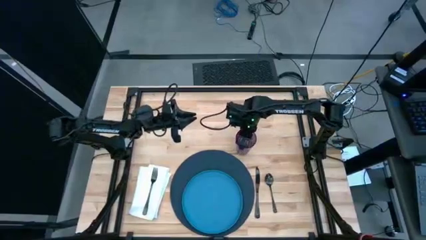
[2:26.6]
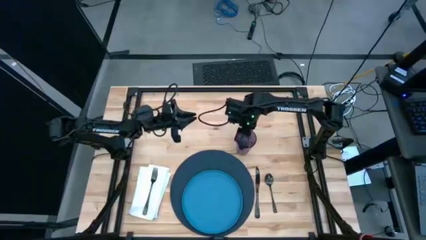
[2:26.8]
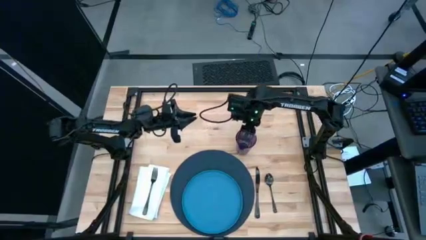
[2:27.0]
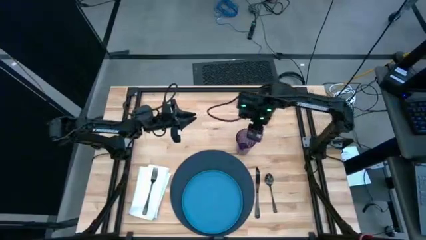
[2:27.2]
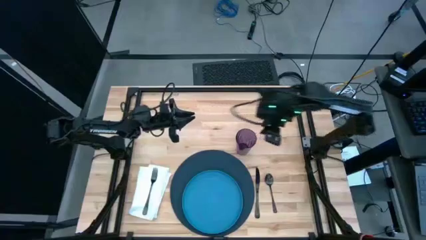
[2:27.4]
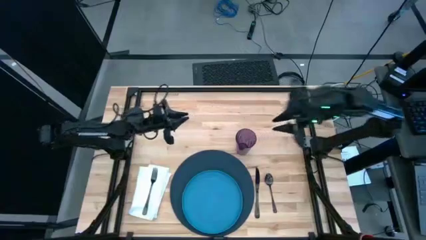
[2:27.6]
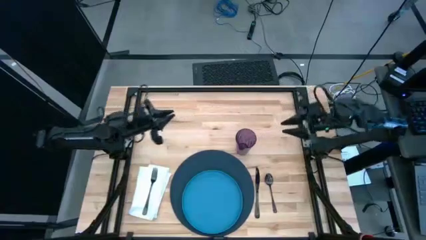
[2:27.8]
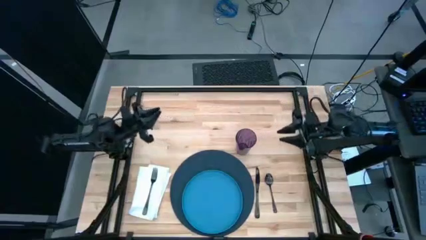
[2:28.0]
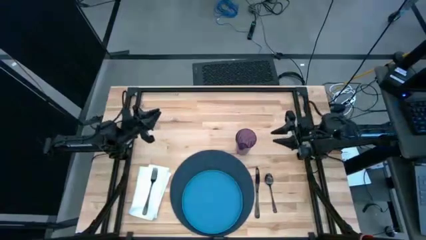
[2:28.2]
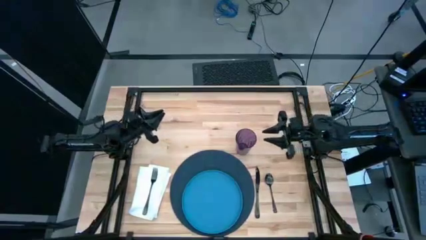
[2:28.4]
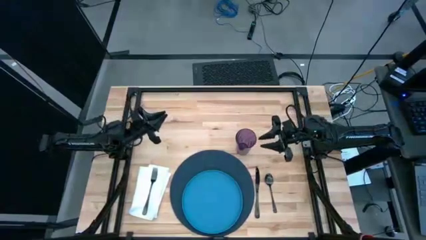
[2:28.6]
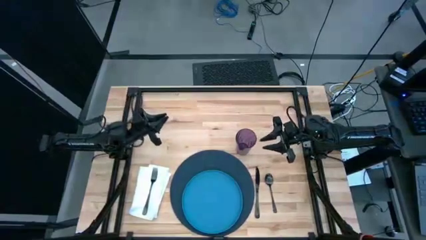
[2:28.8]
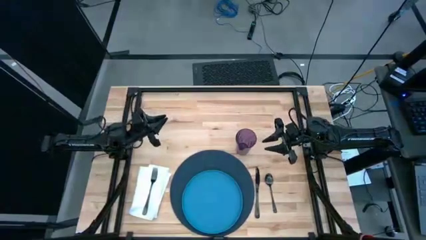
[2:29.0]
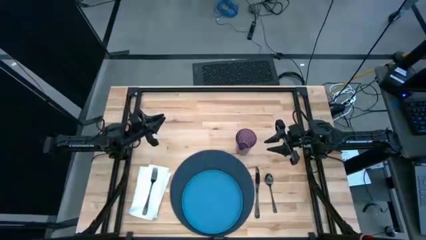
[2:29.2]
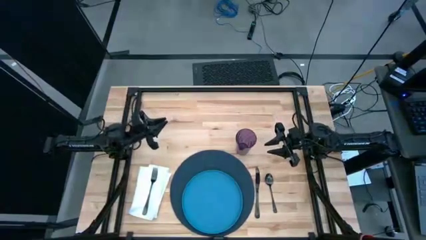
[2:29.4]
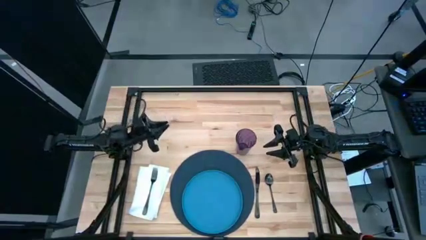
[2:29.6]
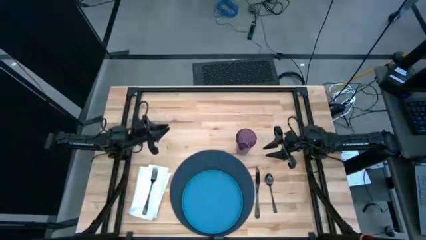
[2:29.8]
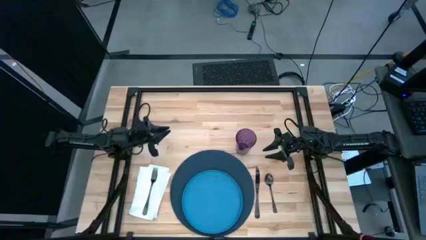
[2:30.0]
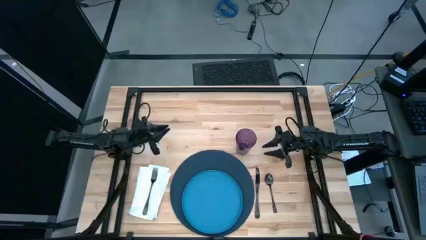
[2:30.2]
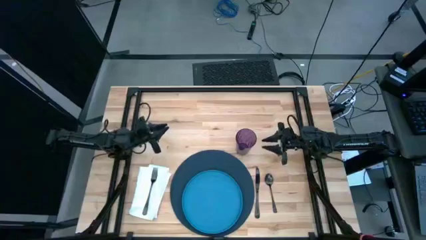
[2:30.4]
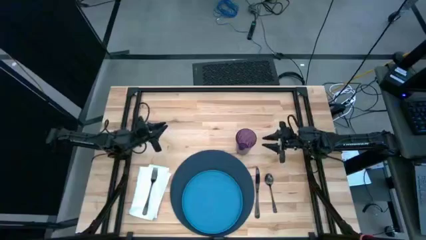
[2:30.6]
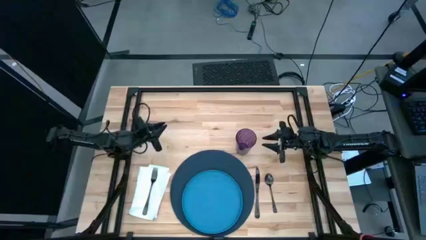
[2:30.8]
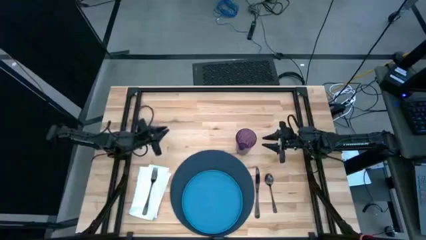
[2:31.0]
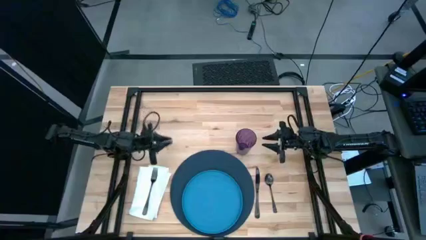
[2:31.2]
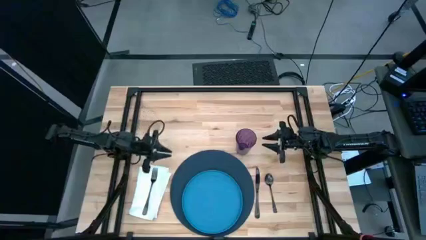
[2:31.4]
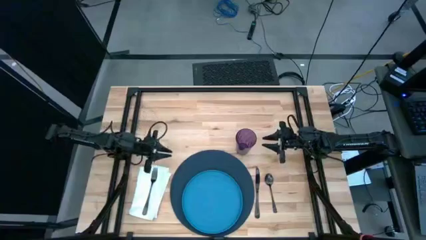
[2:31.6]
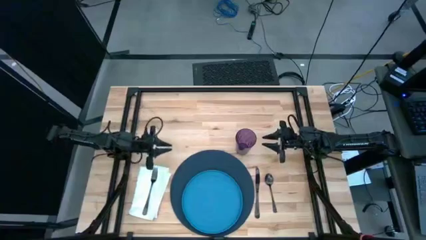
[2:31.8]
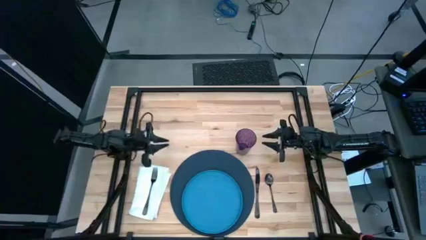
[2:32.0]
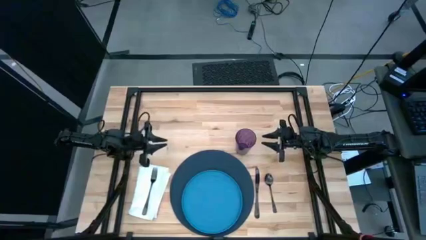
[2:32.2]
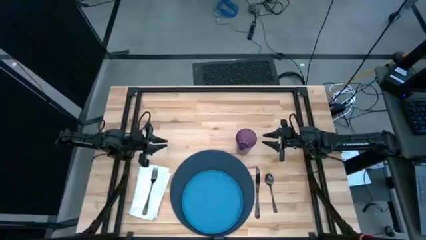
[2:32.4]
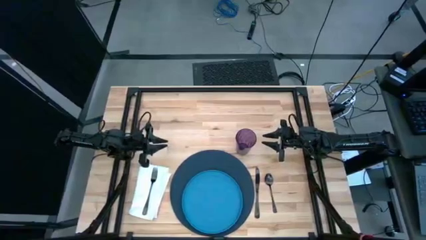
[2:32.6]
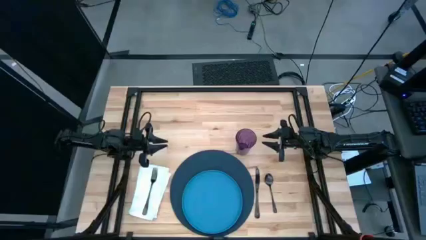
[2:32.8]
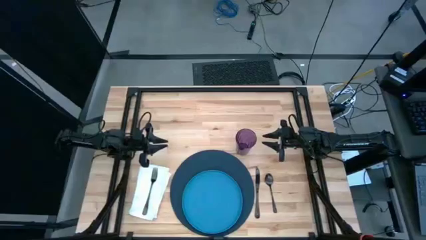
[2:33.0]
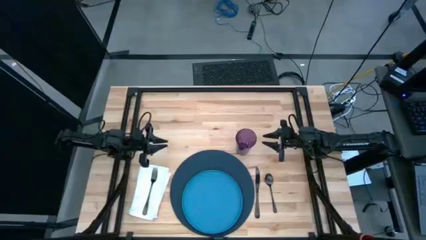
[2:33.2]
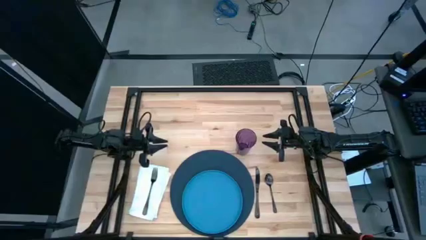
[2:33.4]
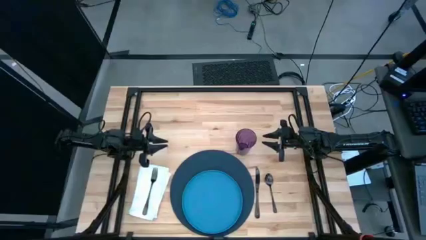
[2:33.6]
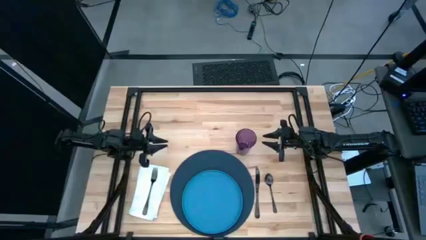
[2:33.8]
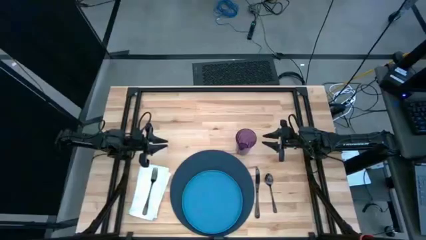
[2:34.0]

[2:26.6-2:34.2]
Task: Set table place
Return to home position

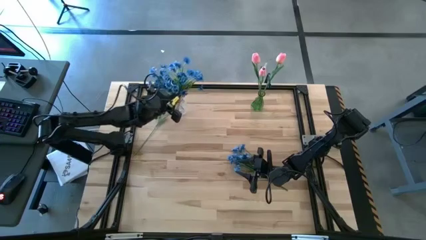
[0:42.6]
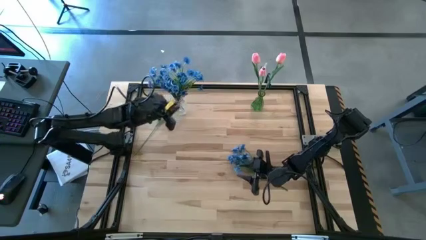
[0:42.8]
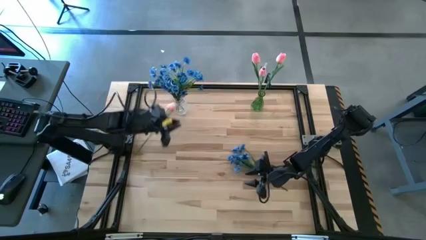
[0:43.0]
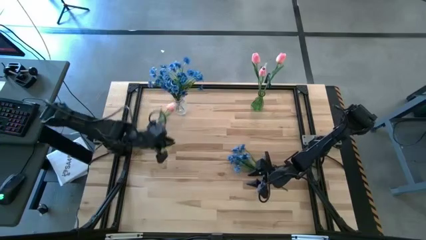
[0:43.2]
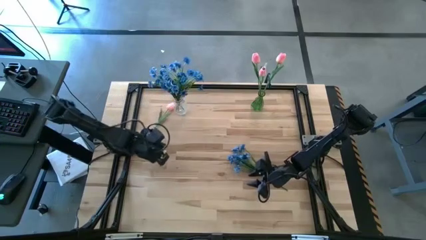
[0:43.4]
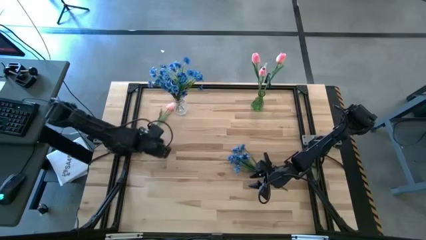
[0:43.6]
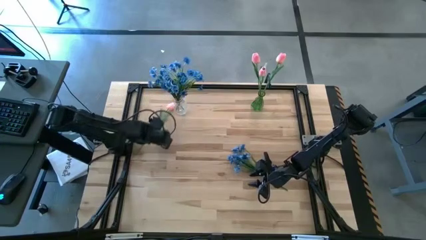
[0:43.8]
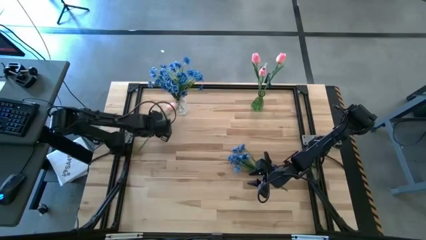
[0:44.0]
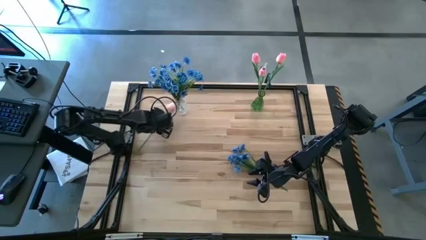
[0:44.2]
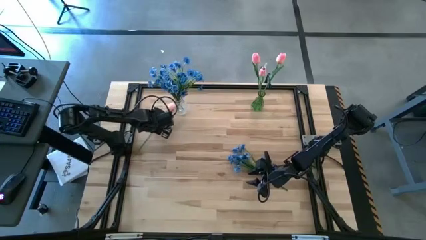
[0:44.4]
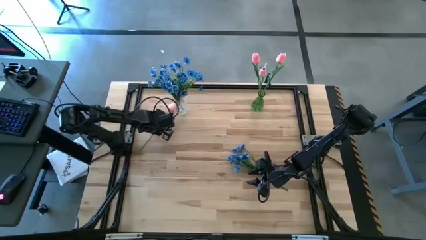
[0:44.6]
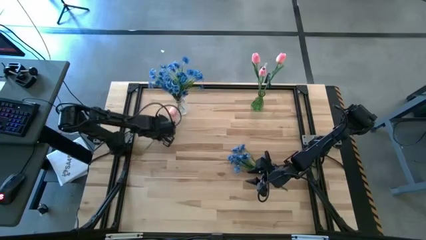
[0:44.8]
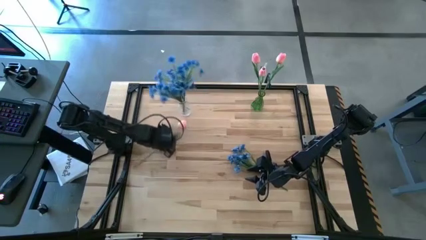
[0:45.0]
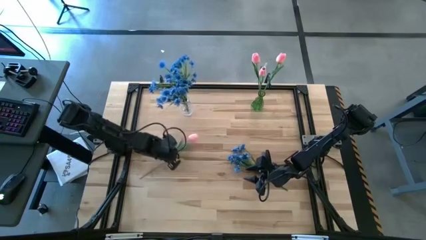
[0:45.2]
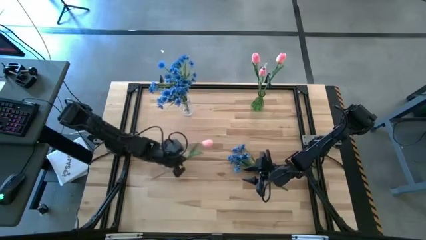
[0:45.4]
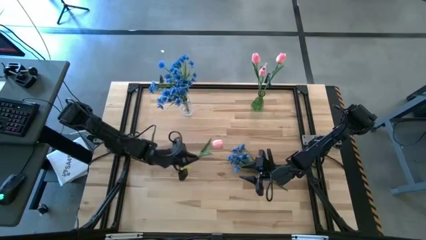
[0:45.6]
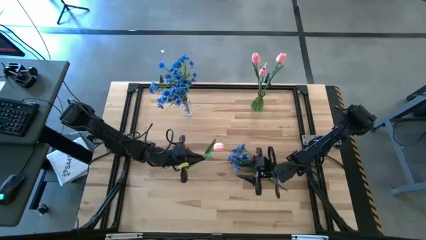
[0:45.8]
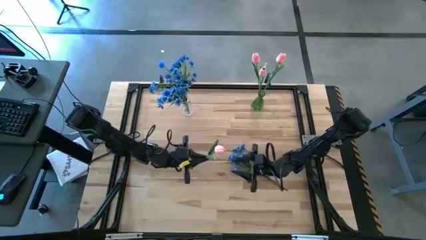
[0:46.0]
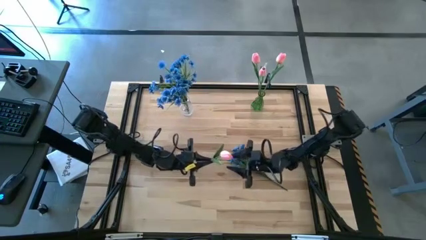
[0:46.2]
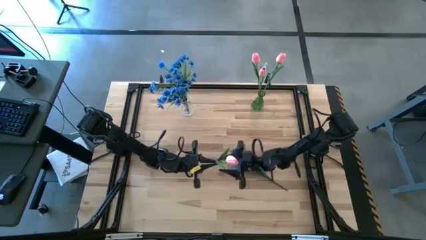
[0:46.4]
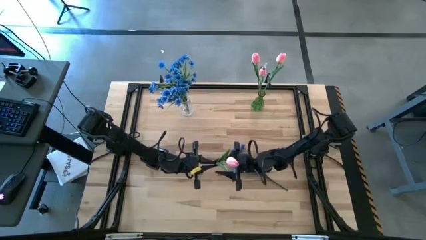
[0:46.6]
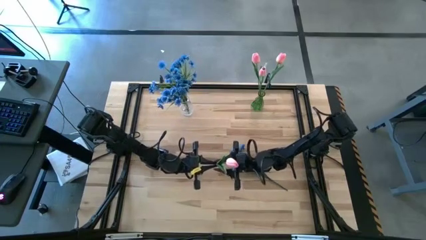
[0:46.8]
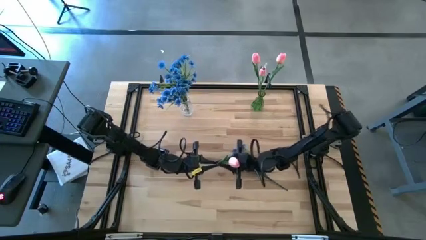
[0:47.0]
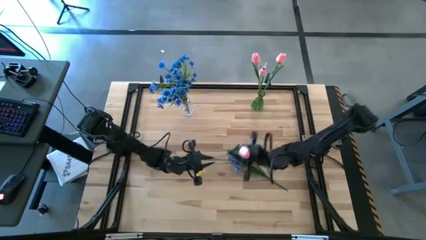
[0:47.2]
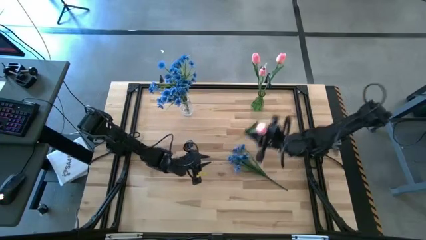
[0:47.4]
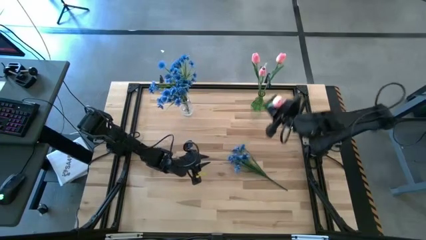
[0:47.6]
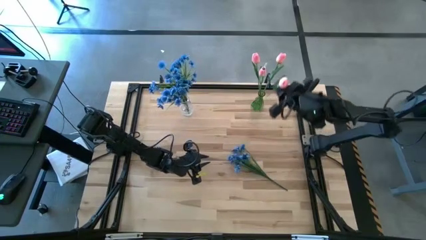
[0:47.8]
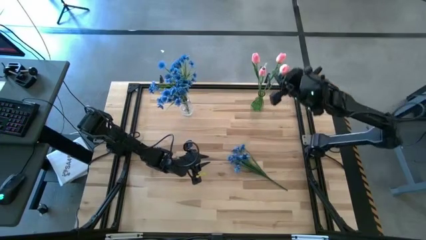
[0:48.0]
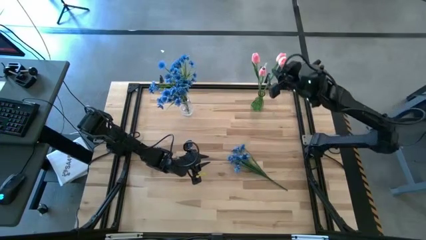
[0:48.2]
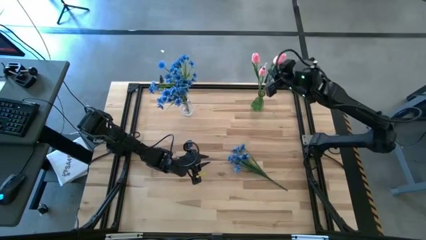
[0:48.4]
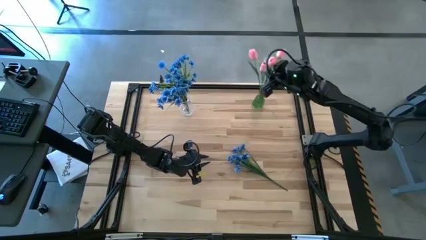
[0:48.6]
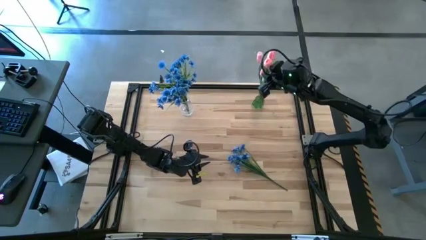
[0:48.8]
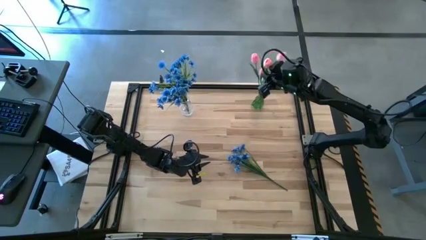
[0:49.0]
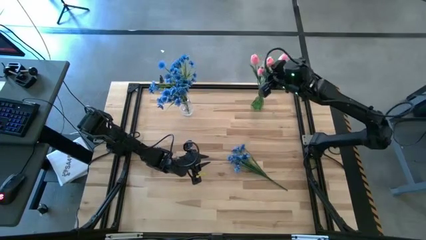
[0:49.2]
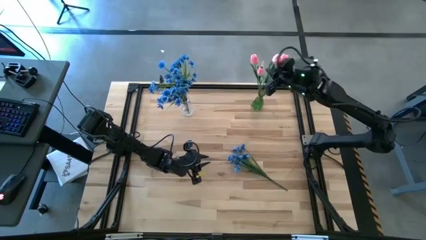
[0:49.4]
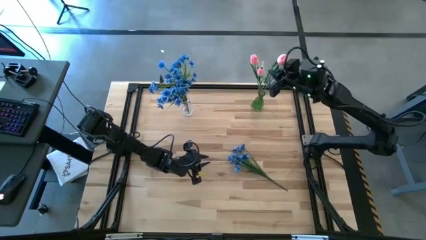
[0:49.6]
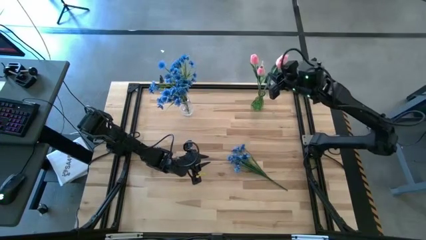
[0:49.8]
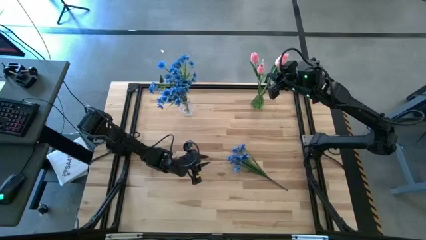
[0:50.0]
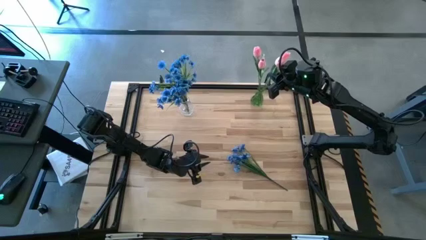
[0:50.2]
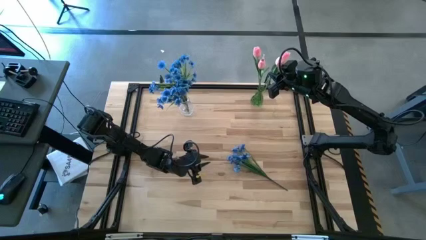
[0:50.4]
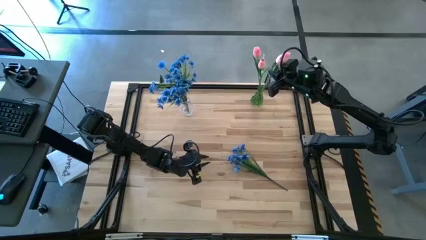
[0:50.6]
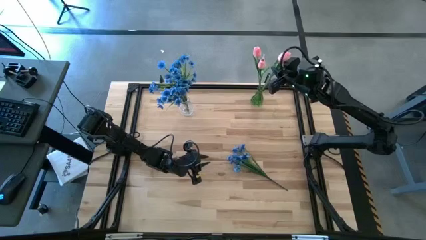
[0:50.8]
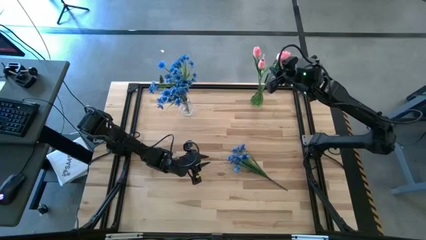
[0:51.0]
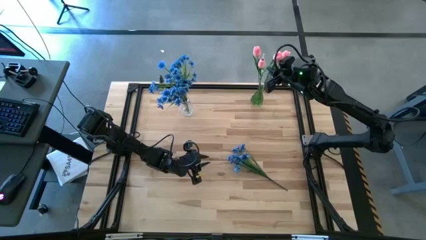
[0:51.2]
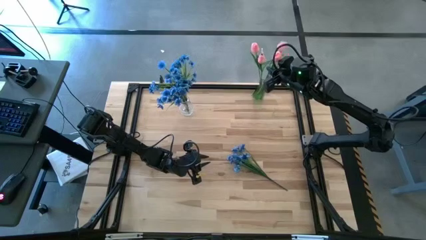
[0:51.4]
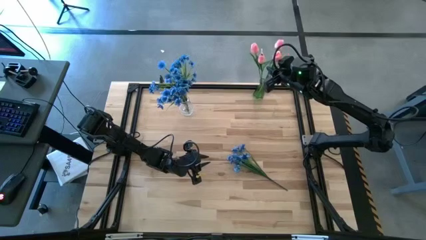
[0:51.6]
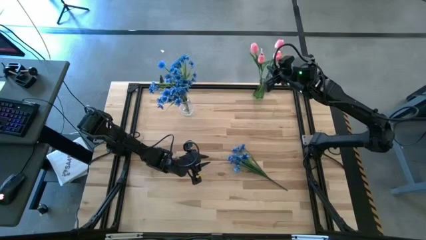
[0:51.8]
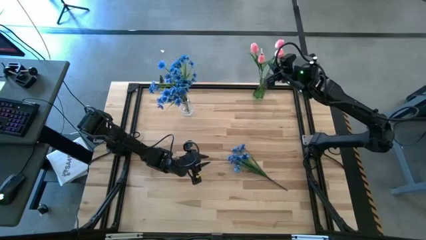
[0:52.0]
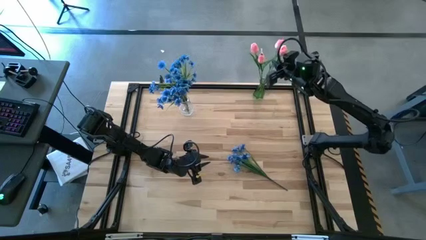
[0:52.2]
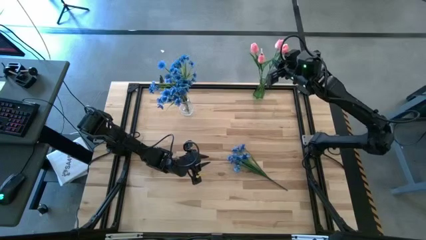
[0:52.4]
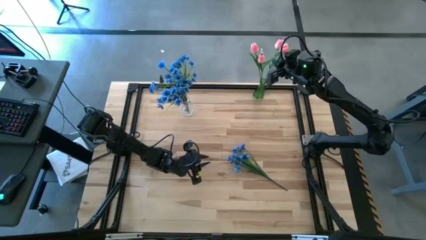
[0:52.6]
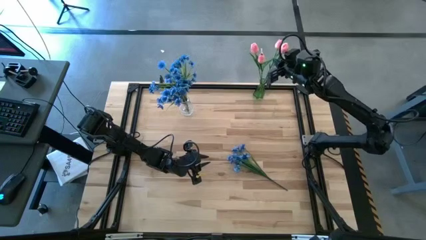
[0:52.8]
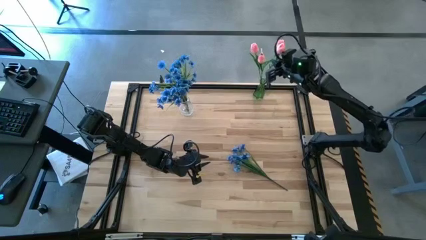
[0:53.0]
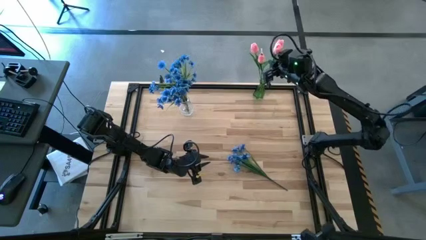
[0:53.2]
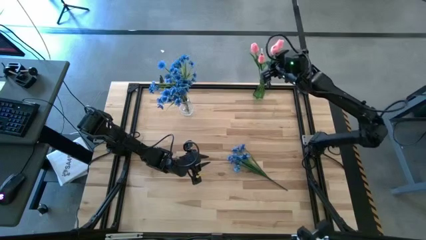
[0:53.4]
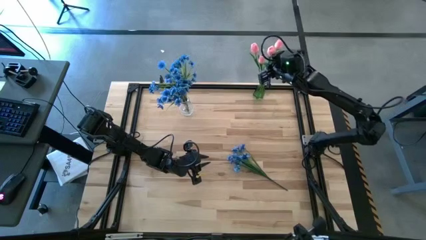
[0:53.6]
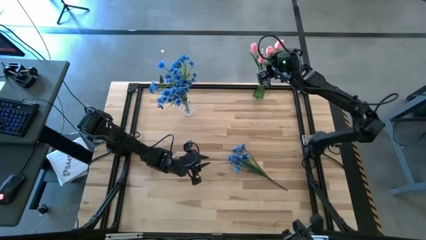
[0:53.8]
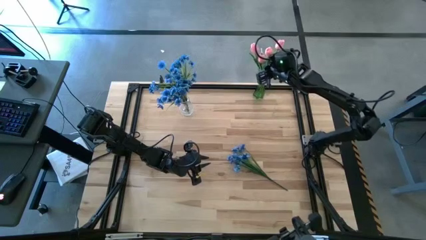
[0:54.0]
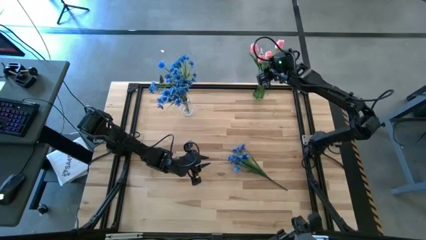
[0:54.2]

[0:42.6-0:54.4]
Task: Sort flowers into vase by color
Put the pink flower into the green vase
